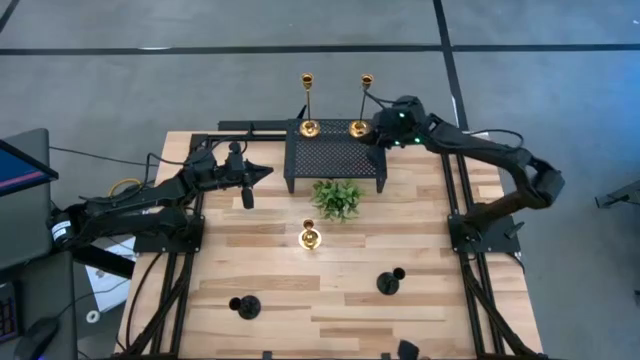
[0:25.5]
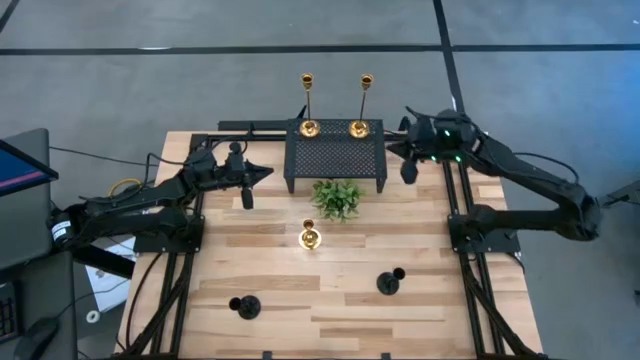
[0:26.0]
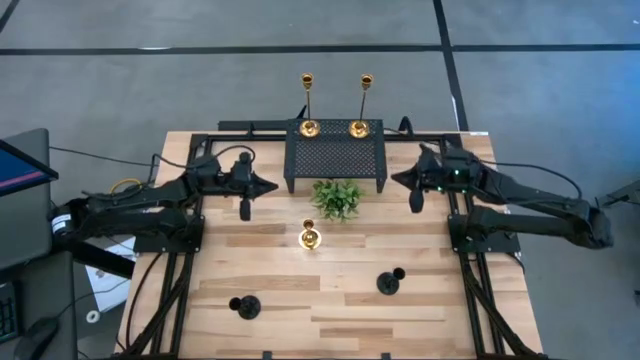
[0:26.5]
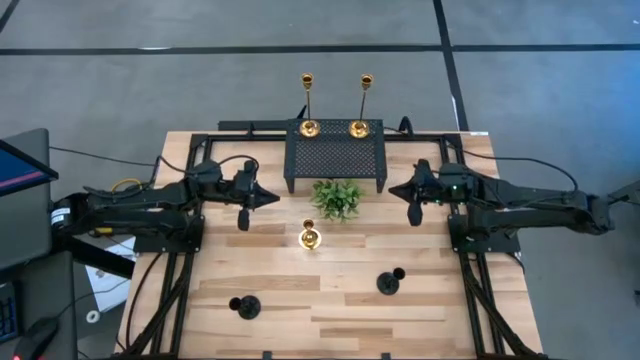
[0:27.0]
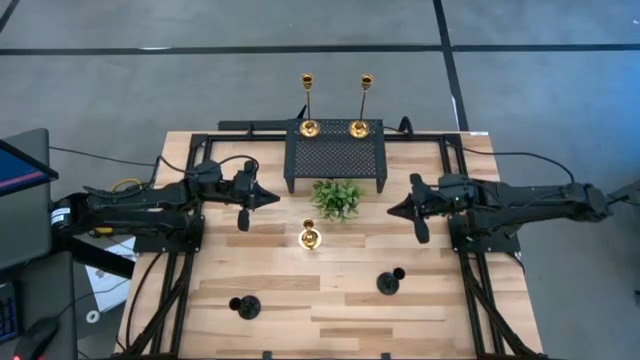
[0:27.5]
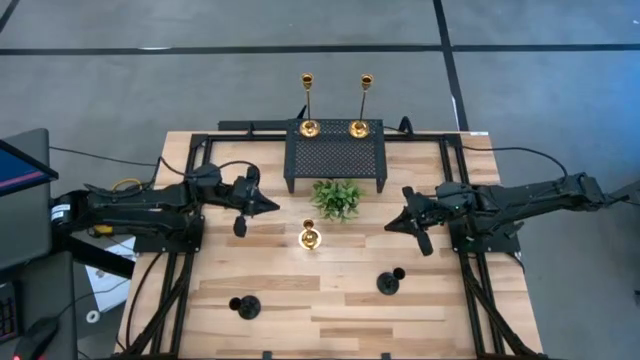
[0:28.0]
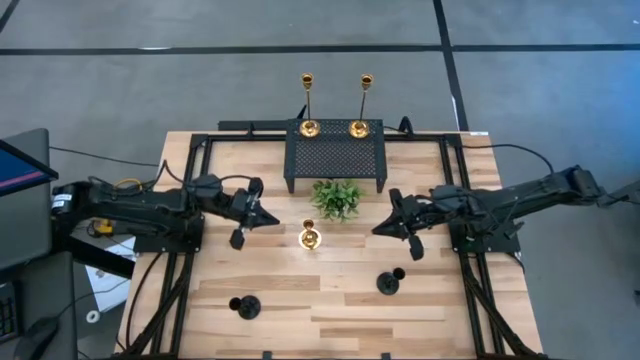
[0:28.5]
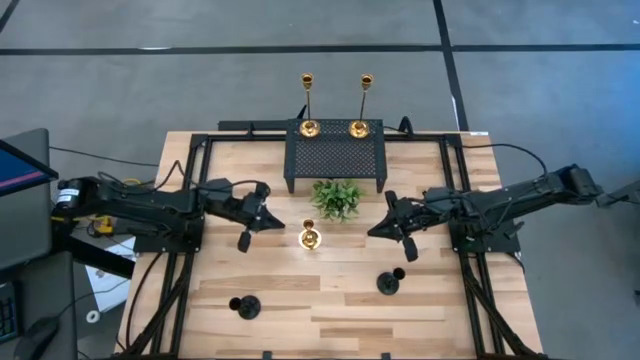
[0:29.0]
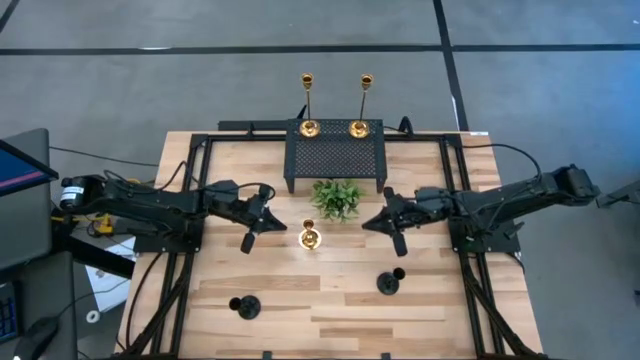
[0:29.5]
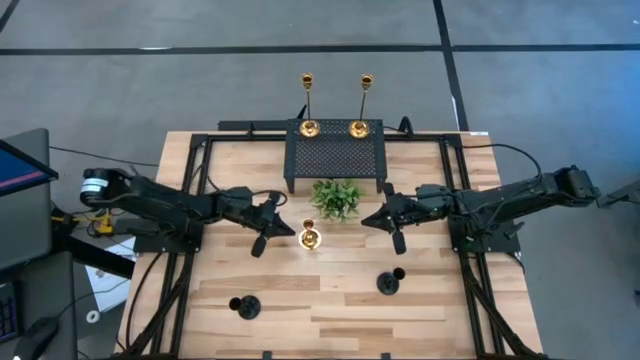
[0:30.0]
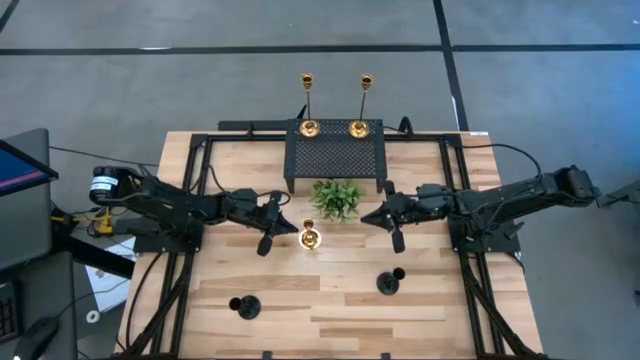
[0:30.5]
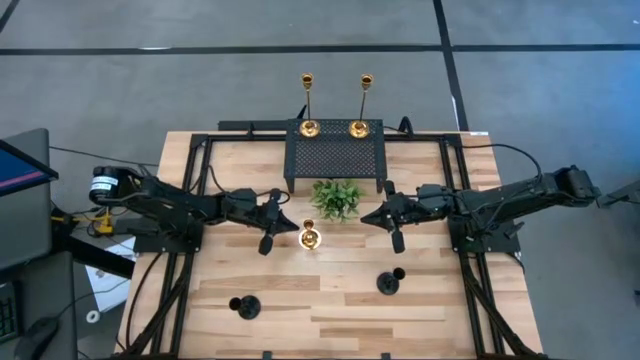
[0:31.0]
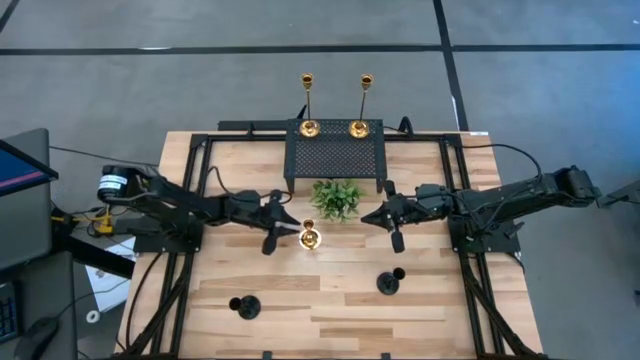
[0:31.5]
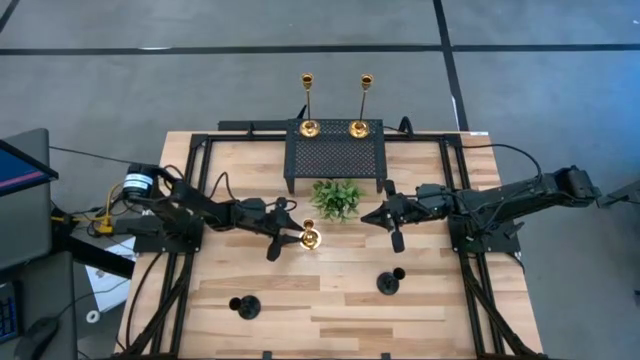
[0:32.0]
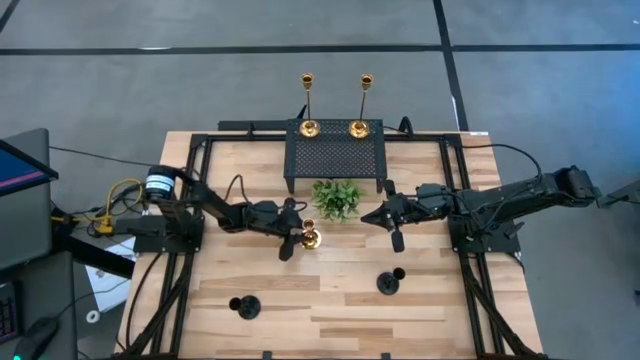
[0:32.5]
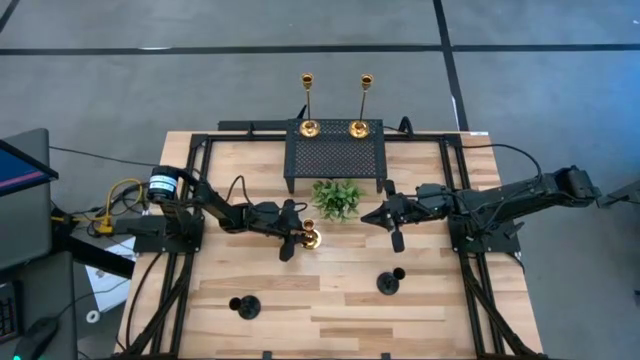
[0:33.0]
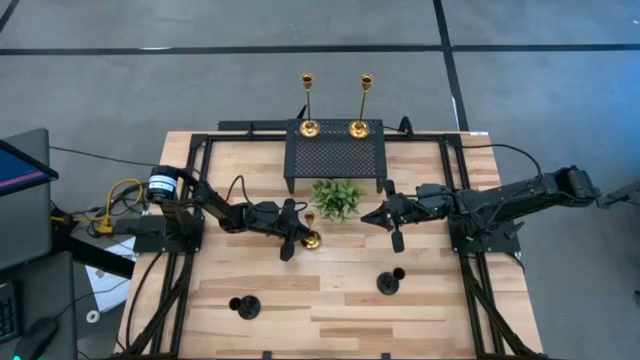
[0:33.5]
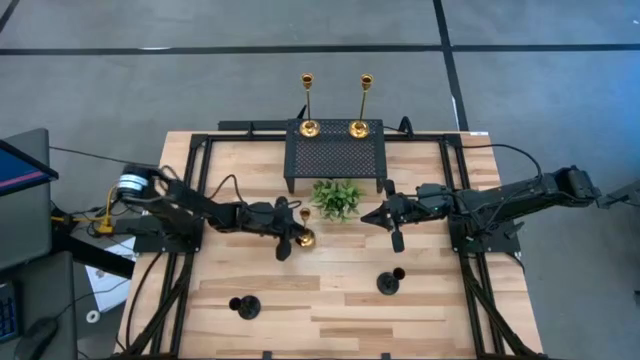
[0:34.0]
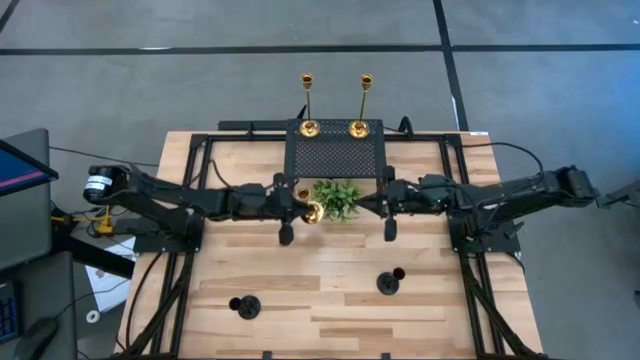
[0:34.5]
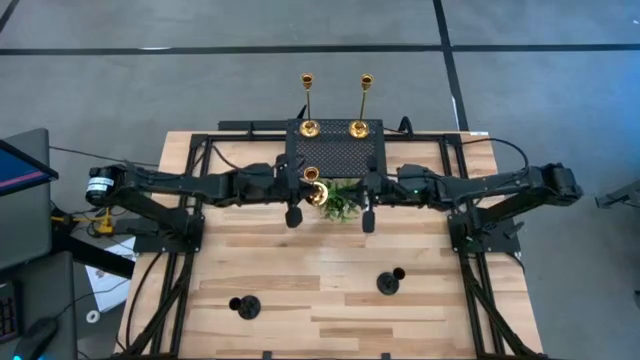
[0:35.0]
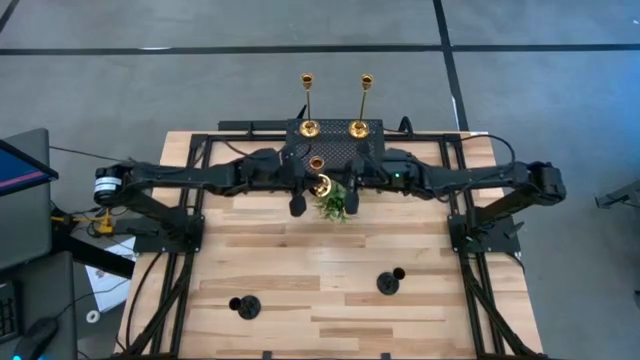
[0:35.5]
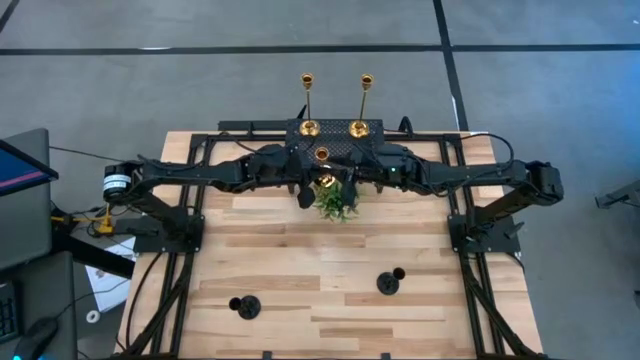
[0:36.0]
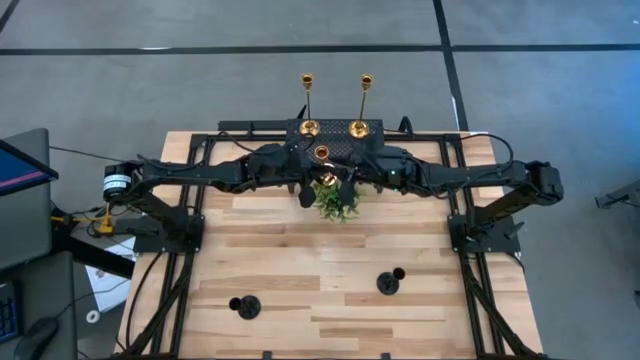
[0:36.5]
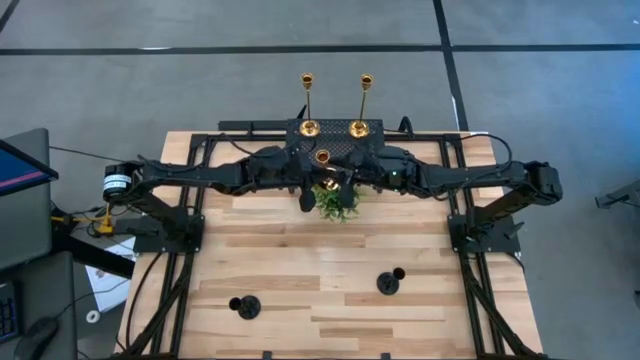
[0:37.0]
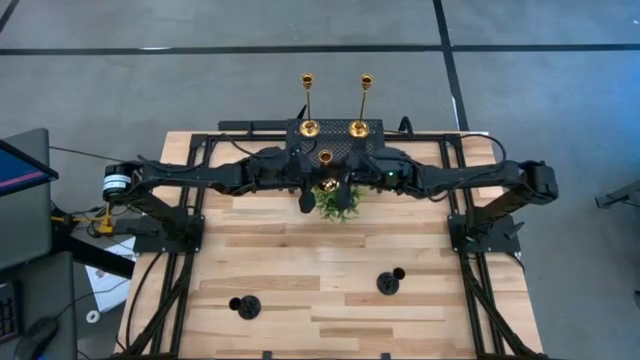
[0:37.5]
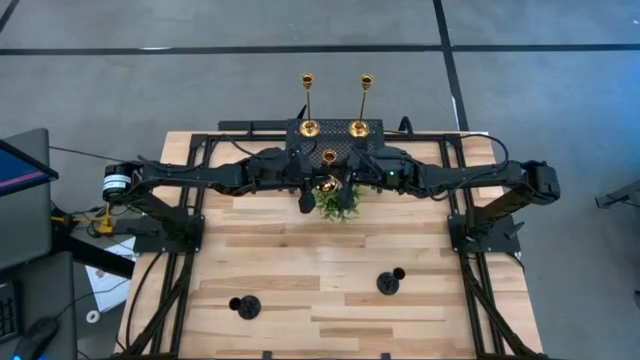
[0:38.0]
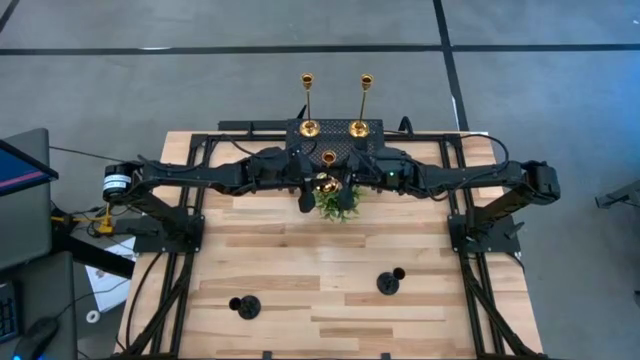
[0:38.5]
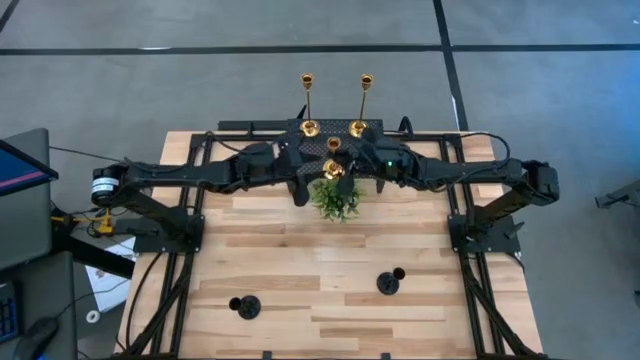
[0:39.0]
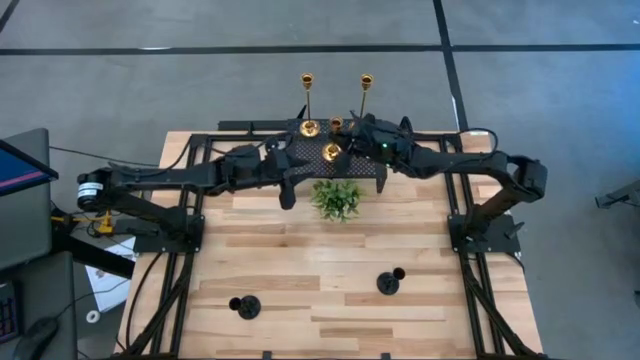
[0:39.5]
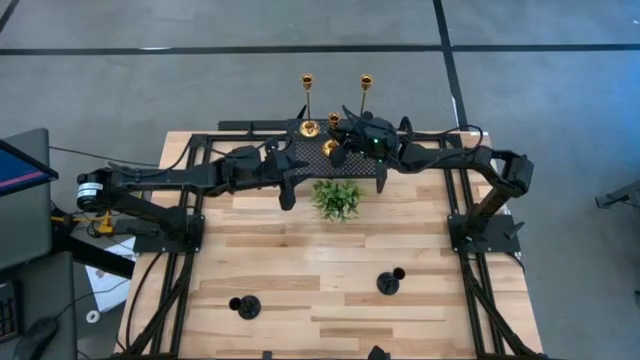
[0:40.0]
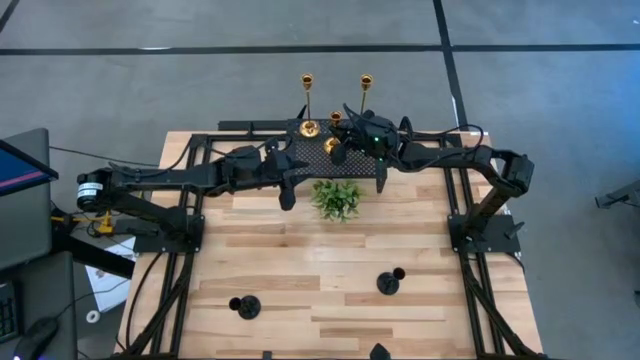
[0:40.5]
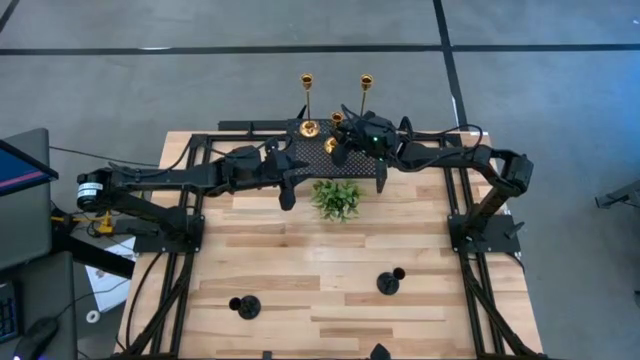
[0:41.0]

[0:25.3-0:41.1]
Task: Pick & Place candle stick holders
Put the gold candle holder on the shelf

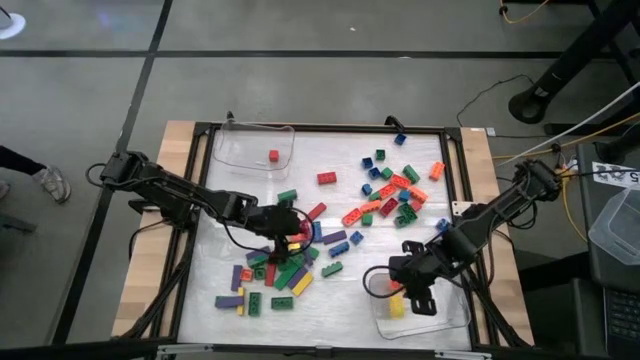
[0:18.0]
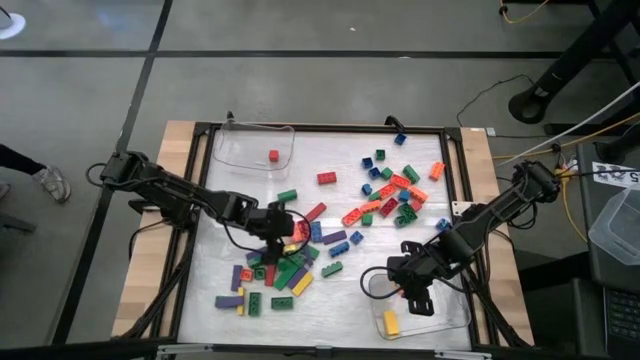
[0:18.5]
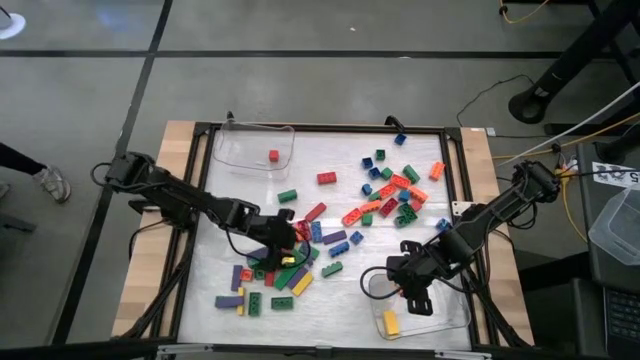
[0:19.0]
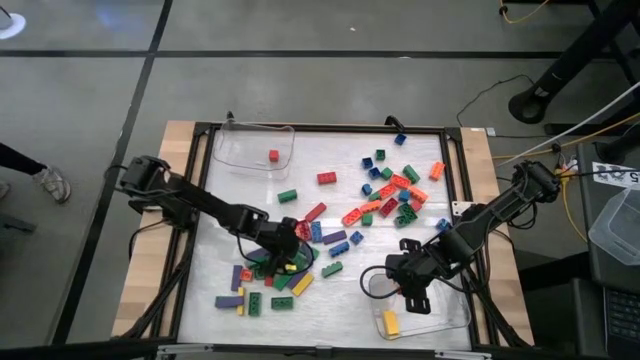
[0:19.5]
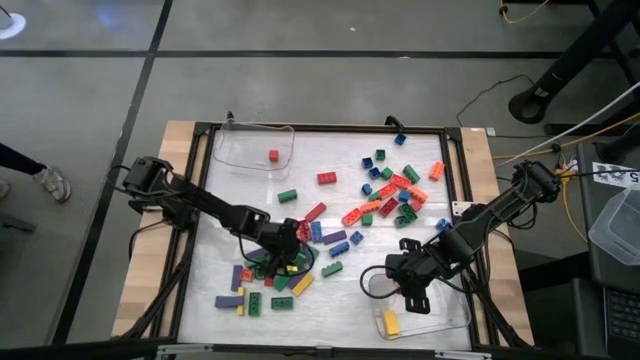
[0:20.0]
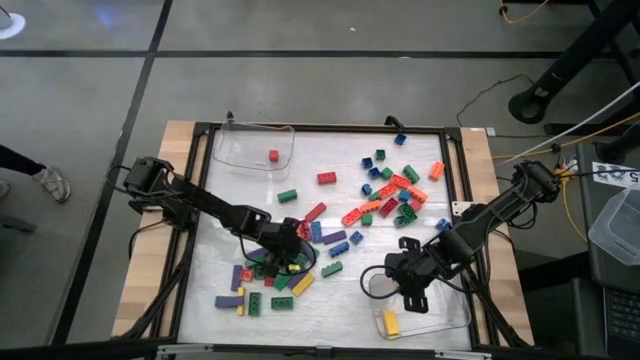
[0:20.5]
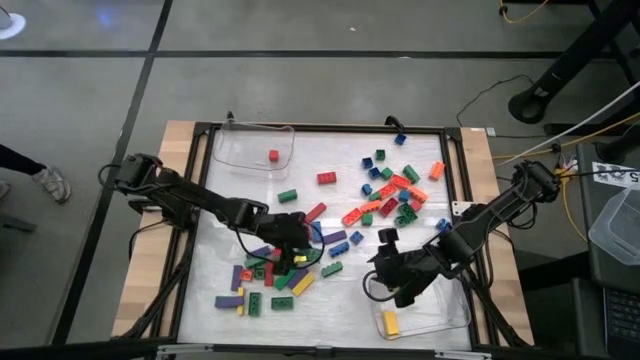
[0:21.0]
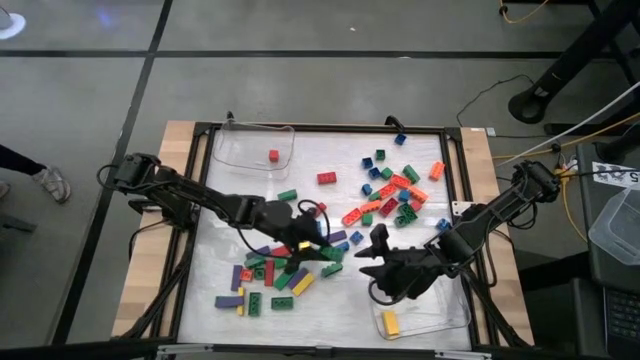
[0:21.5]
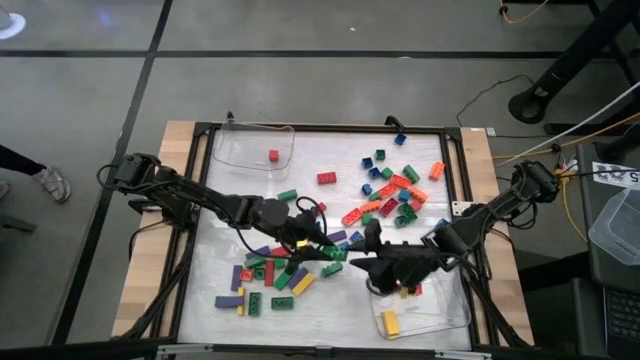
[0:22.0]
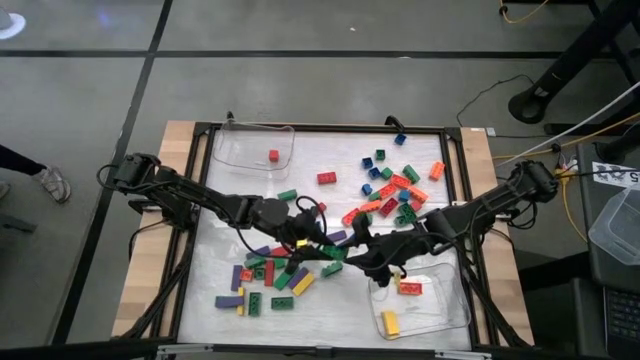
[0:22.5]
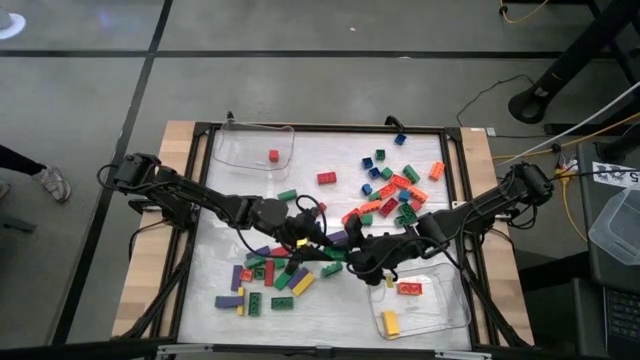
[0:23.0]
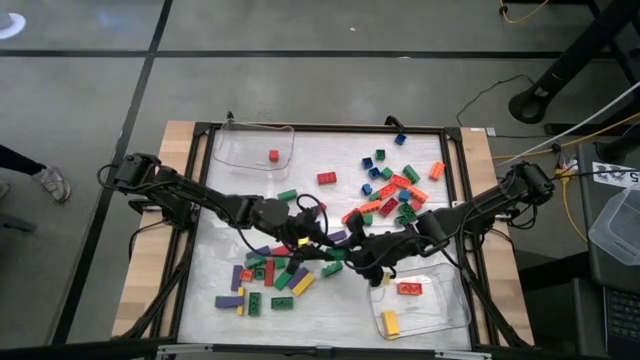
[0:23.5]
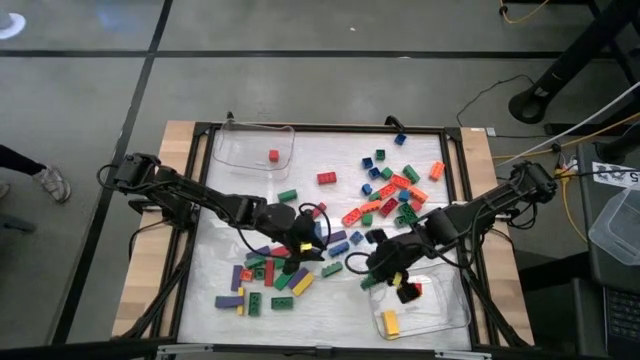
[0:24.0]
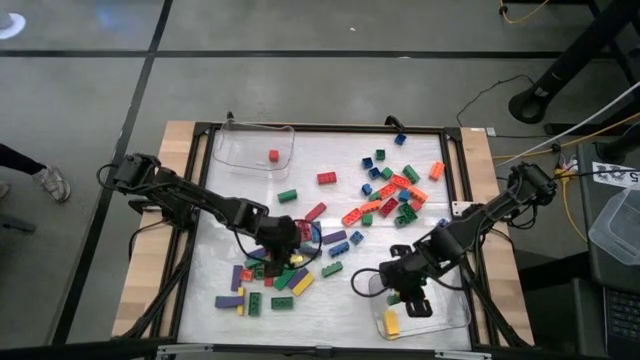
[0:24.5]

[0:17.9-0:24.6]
Task: Sort blocks by size
Put the rectangular green game piece into the bottom transparent bin
